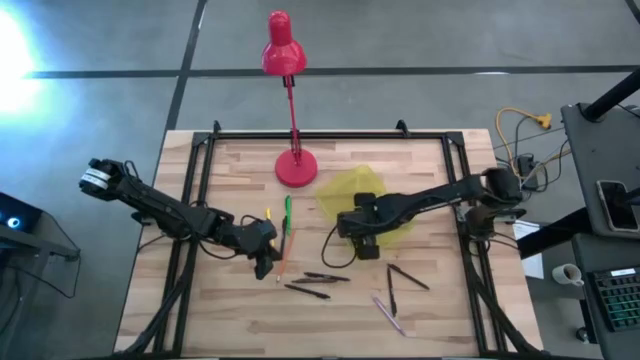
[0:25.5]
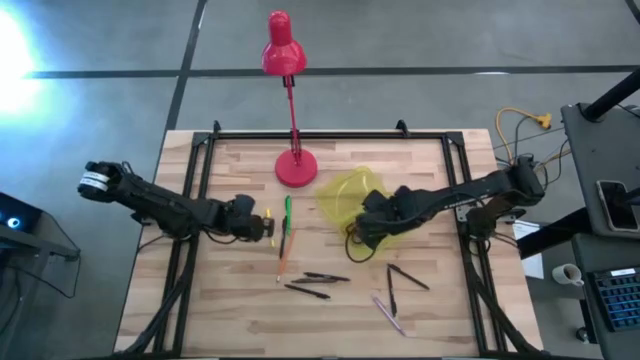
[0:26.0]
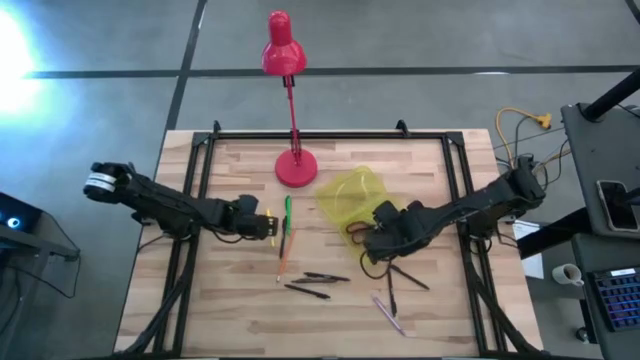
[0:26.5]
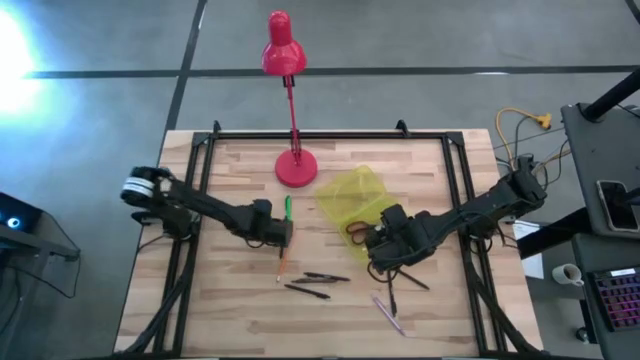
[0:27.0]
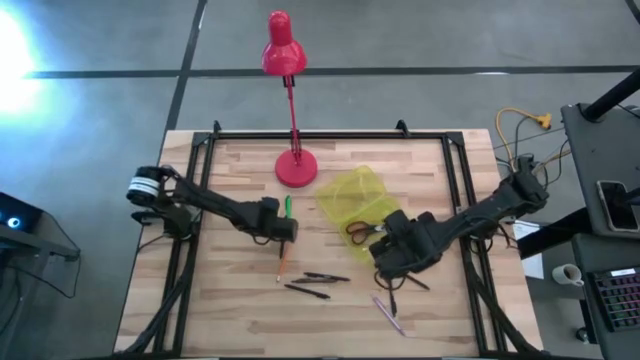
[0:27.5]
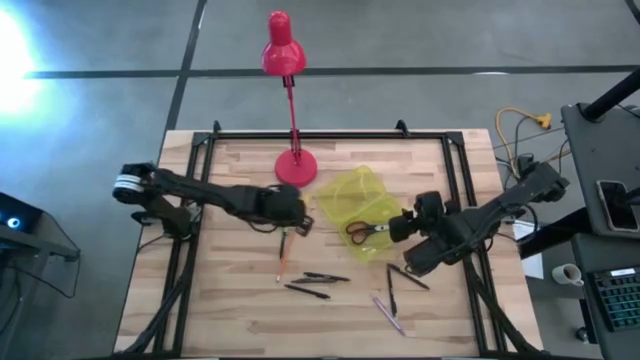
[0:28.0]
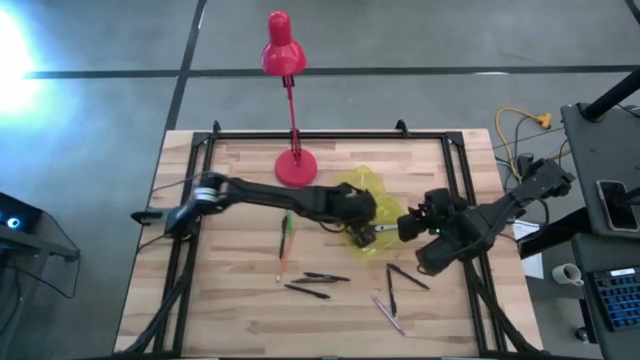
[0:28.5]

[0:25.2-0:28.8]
Task: Pick & place school supplies into a supply box
Put the yellow pen into the yellow supply box

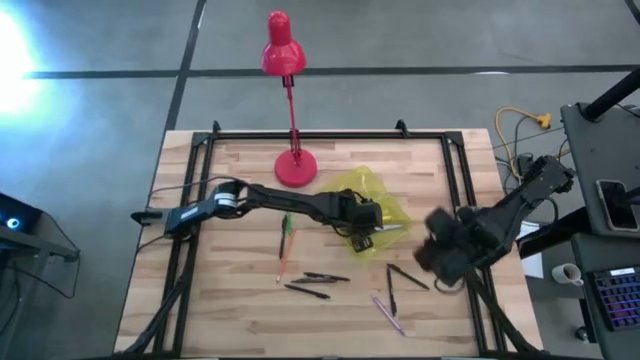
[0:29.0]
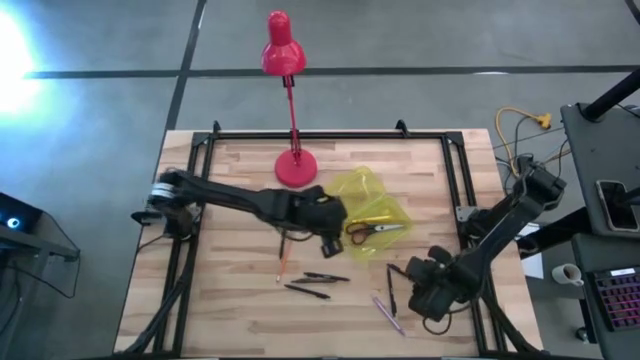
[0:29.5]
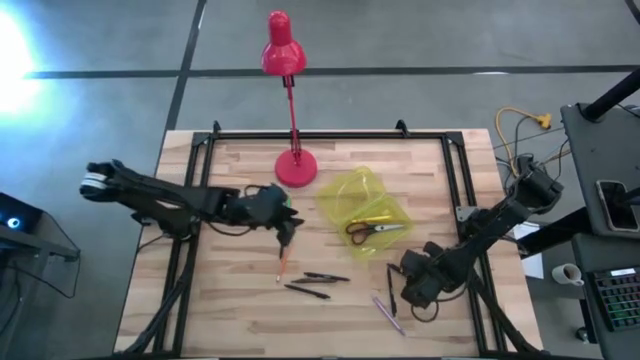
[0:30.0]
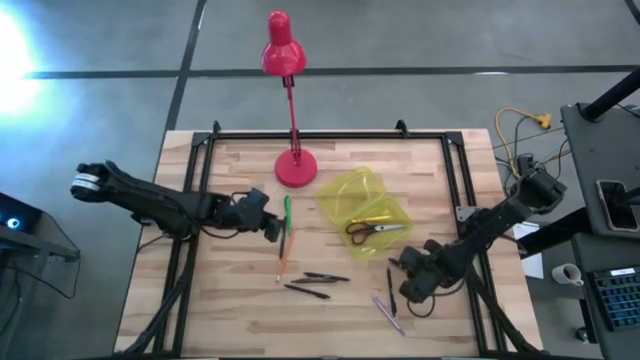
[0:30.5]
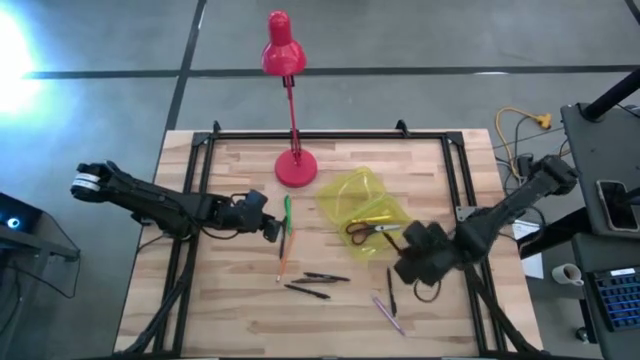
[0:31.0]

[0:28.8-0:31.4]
Put the black pen into the yellow supply box

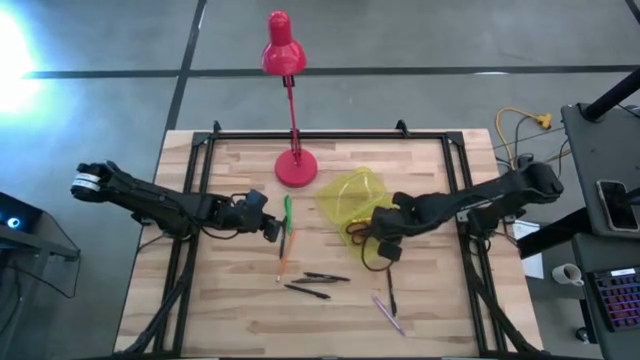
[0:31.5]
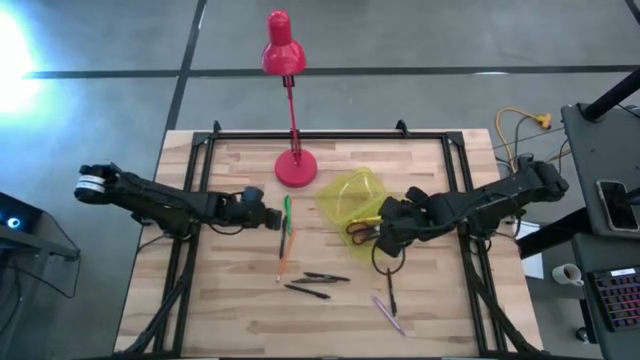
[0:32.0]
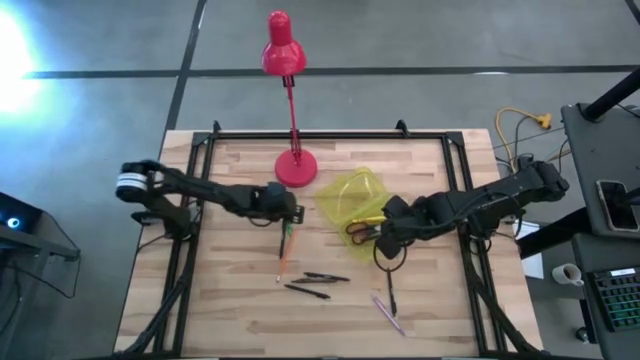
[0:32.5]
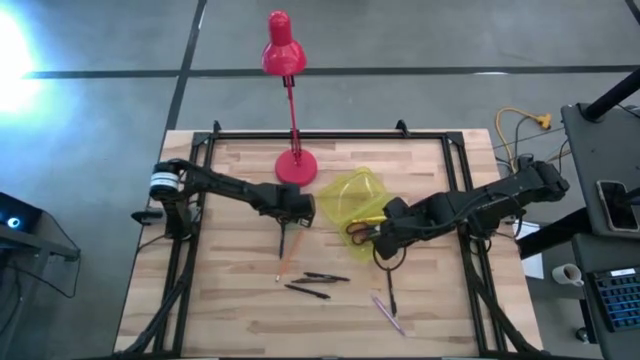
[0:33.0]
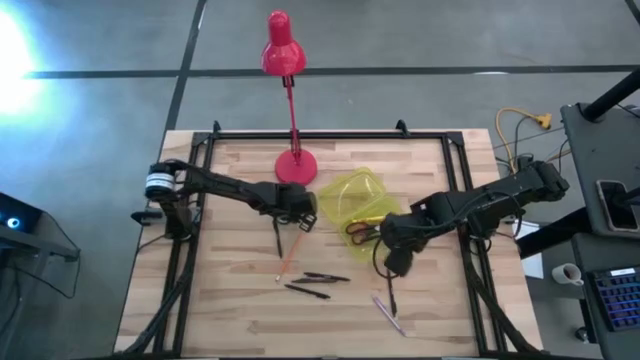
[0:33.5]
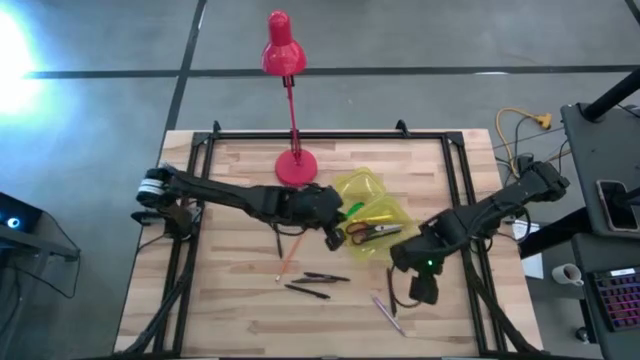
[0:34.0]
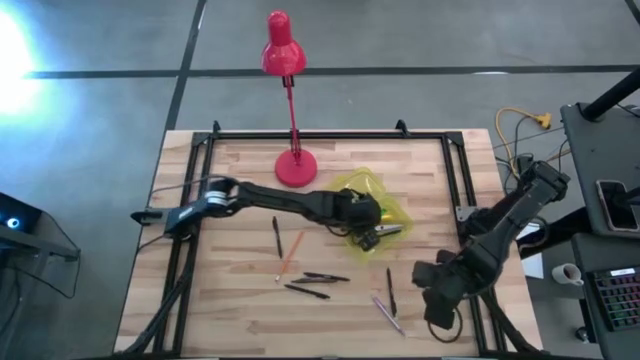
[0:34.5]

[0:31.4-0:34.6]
Put the green pen into the yellow supply box

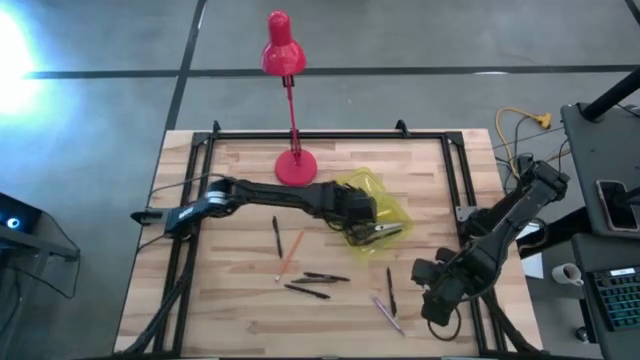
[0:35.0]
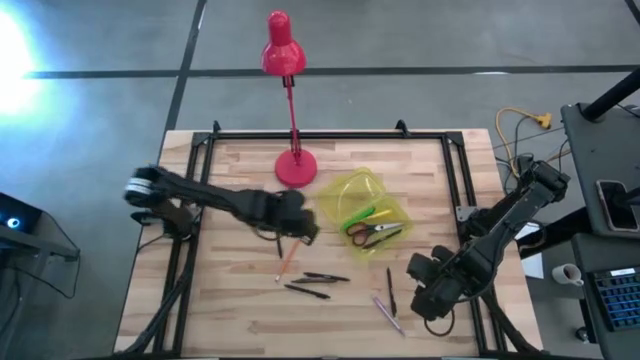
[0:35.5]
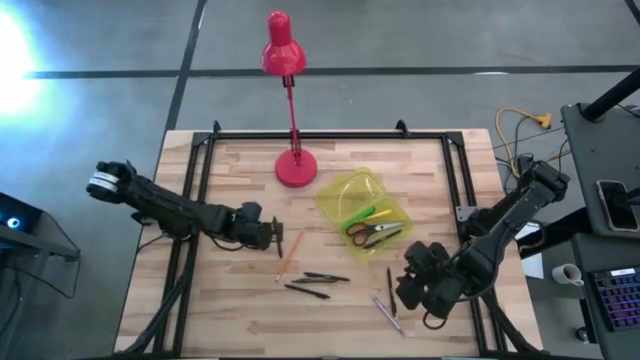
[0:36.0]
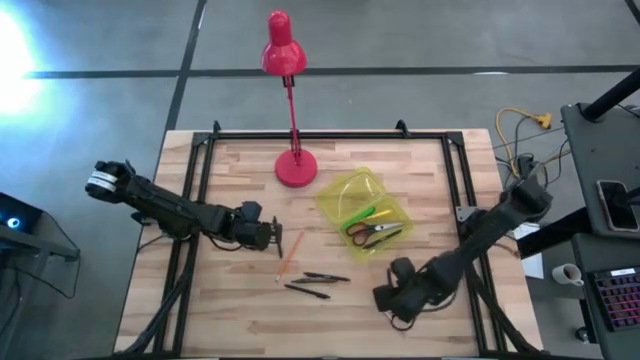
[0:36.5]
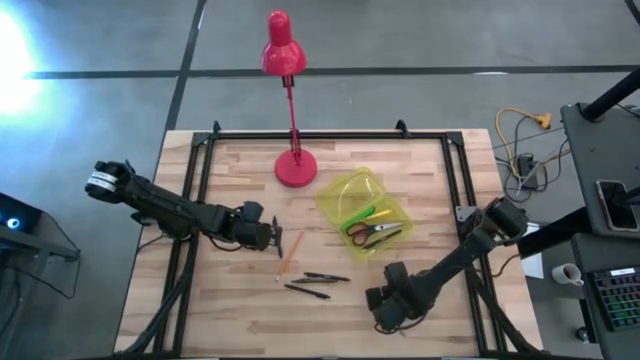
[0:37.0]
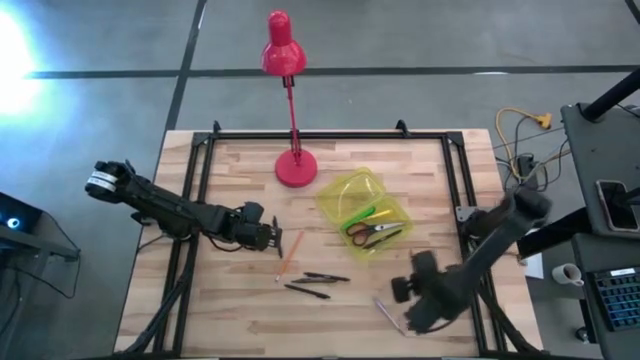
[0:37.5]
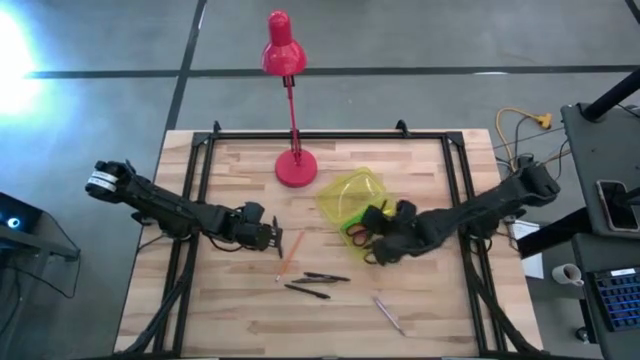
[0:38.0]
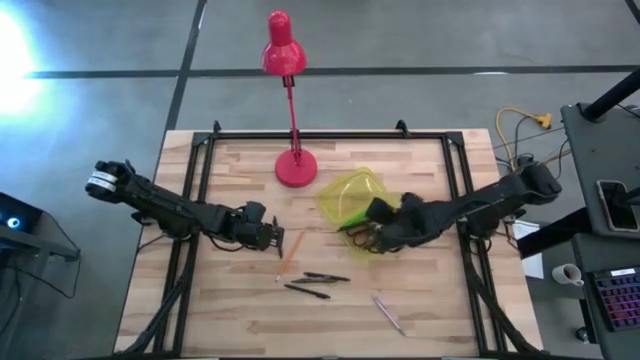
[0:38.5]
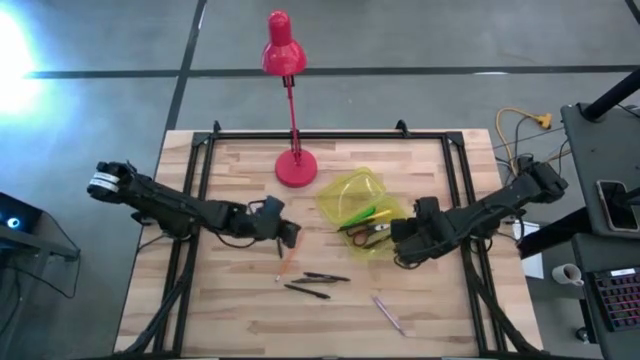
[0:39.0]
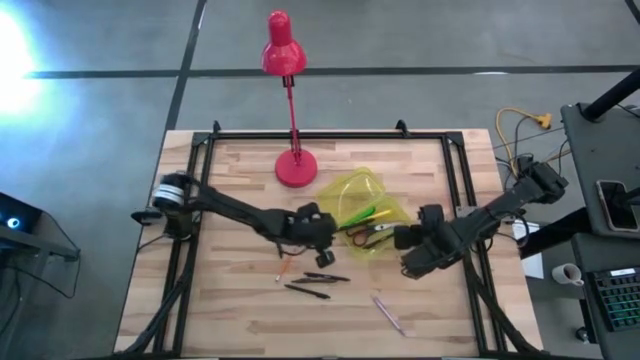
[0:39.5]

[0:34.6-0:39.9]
Put the black pen into the yellow supply box

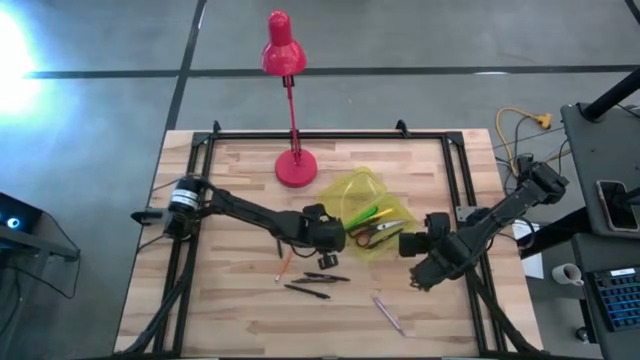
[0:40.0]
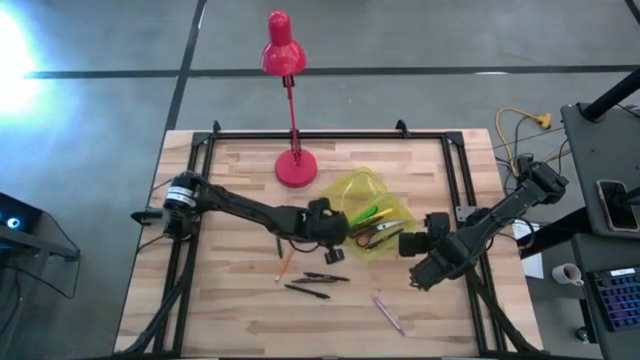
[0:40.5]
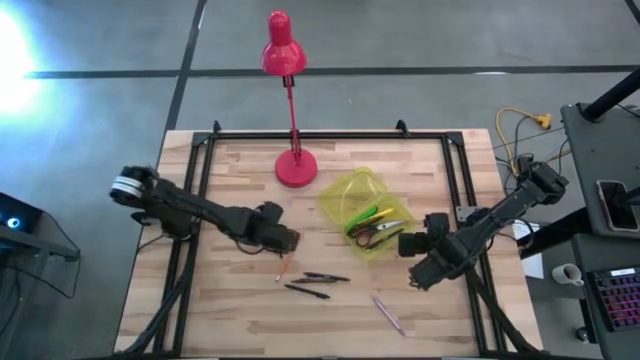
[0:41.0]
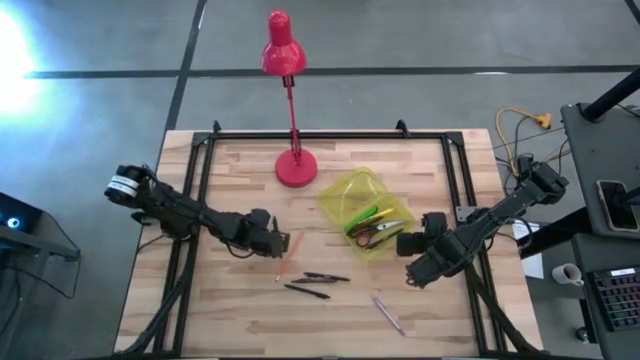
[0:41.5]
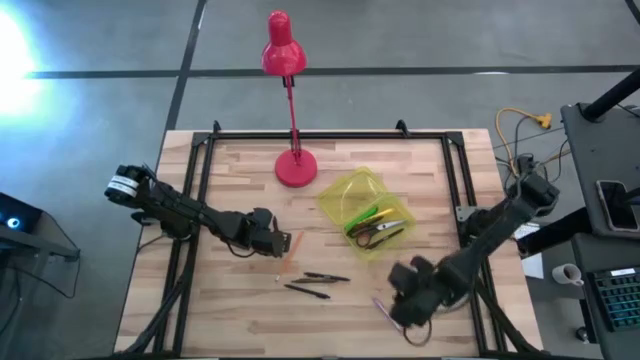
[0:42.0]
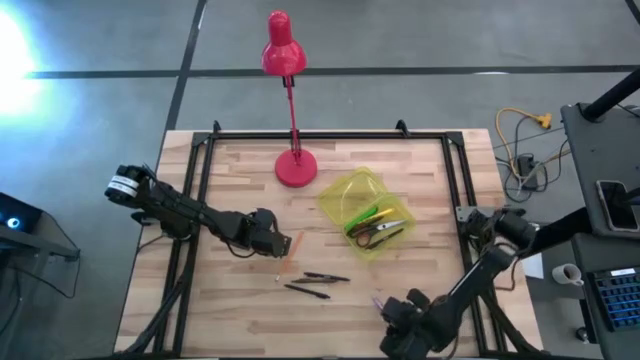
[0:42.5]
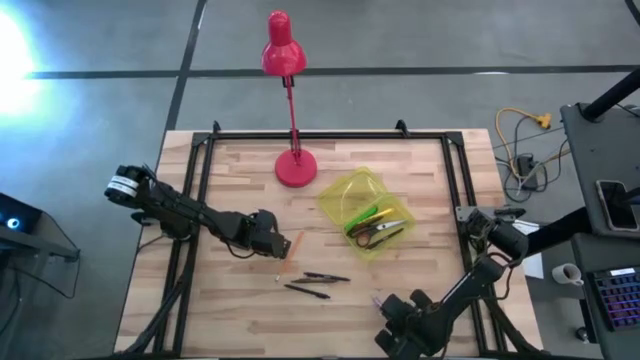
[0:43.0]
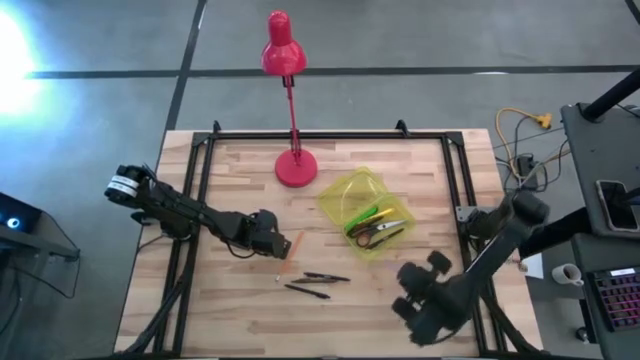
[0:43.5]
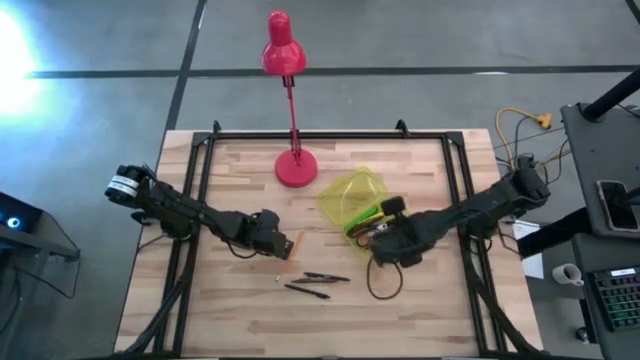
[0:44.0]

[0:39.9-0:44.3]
Put the purple pen into the yellow supply box

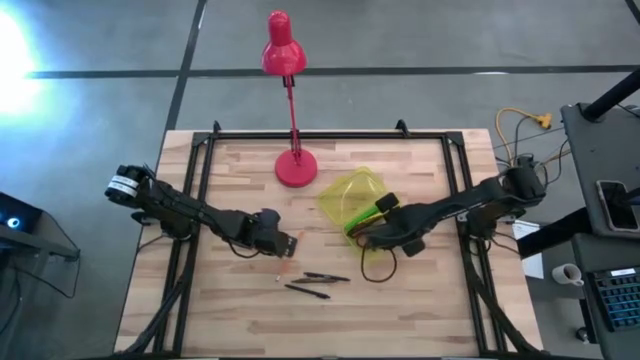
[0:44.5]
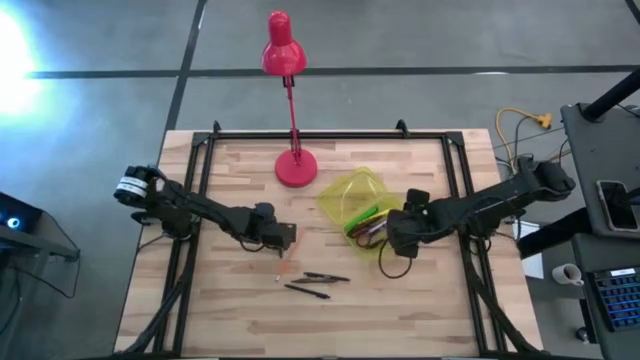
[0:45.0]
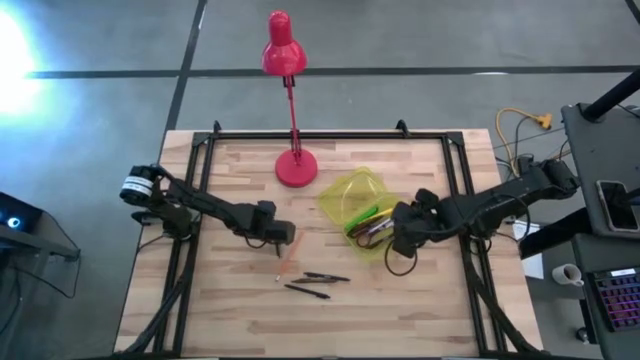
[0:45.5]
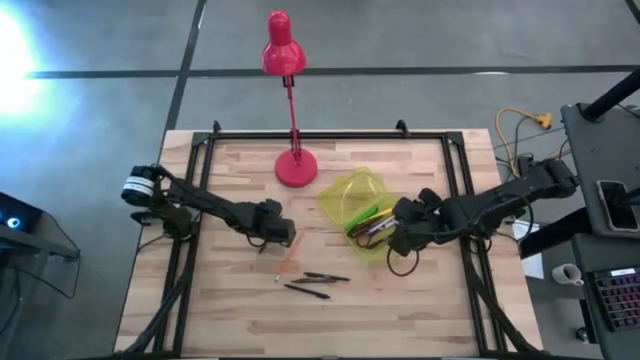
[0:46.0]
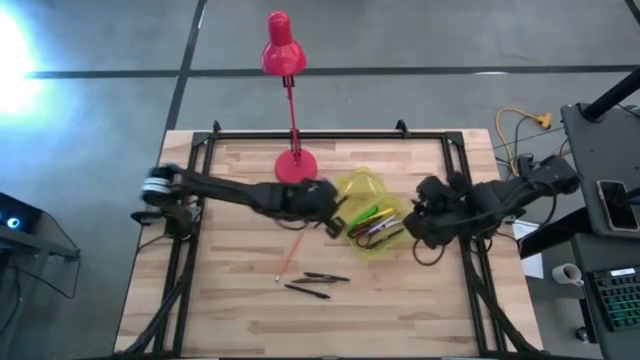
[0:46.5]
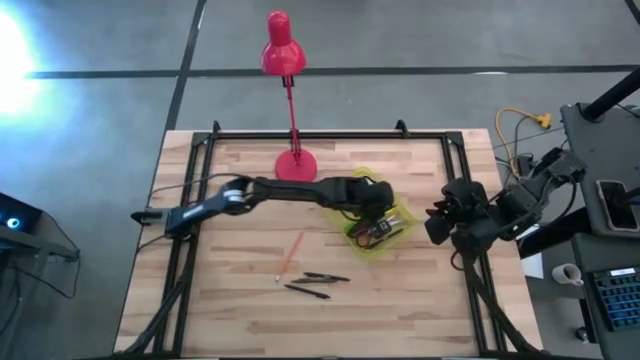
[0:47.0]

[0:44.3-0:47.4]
Put the black pen into the yellow supply box

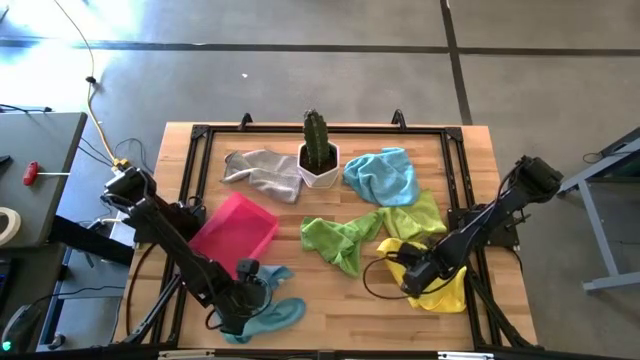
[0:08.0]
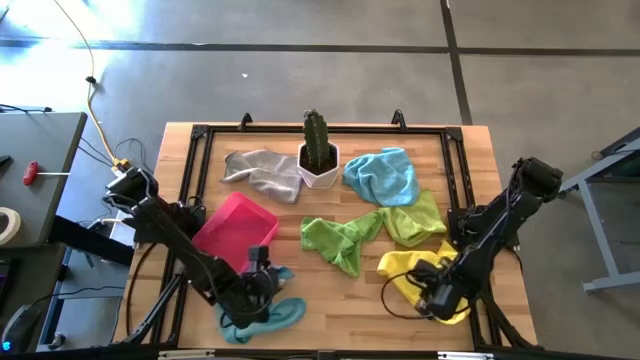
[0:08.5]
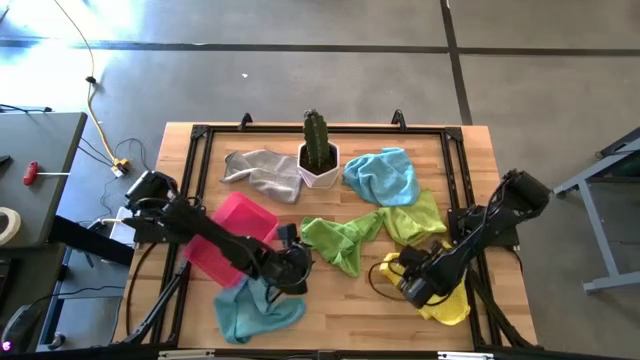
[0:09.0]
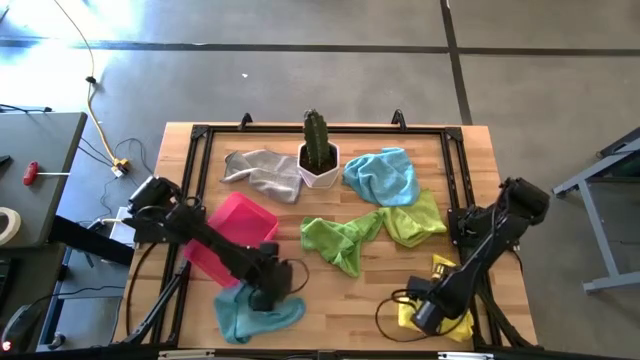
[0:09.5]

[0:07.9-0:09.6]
Task: Fold microfiber towels
Adjust the yellow towel
